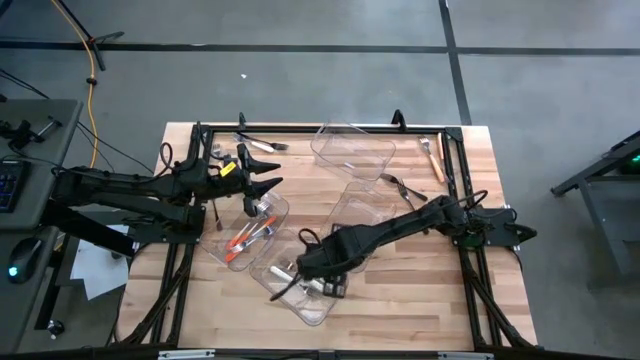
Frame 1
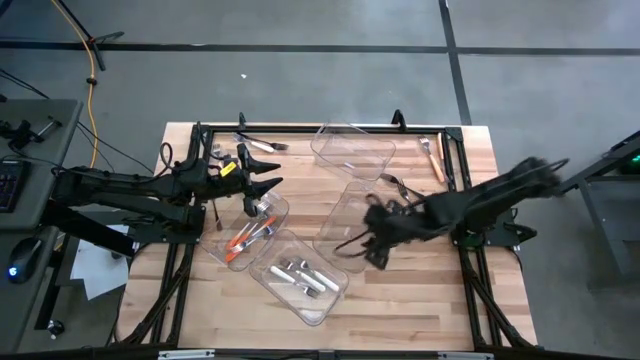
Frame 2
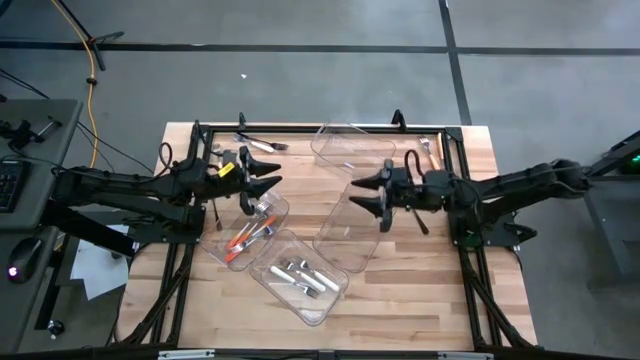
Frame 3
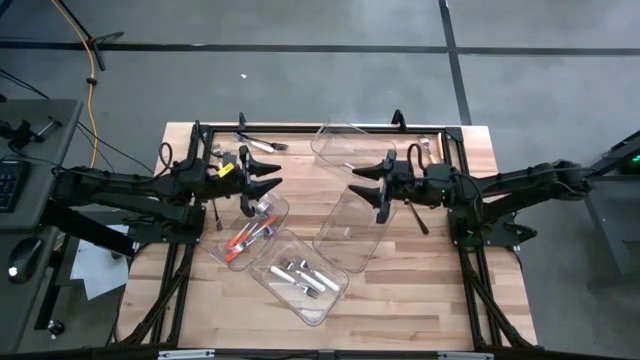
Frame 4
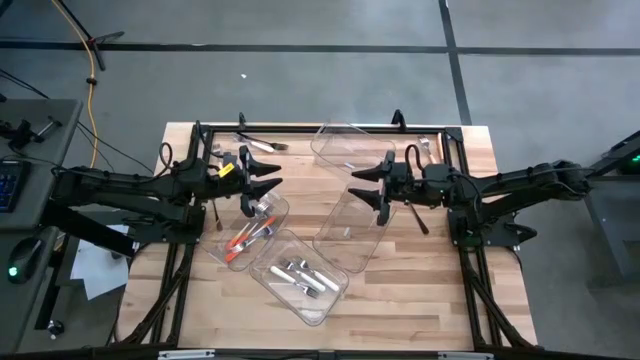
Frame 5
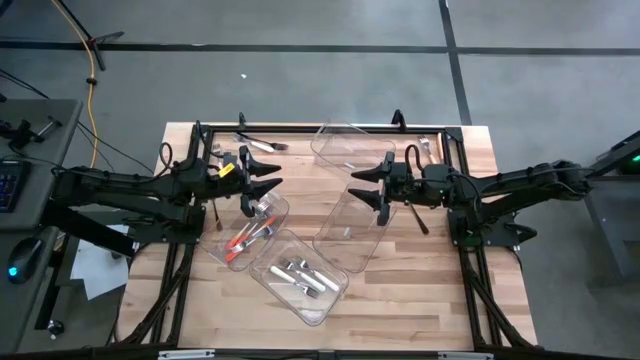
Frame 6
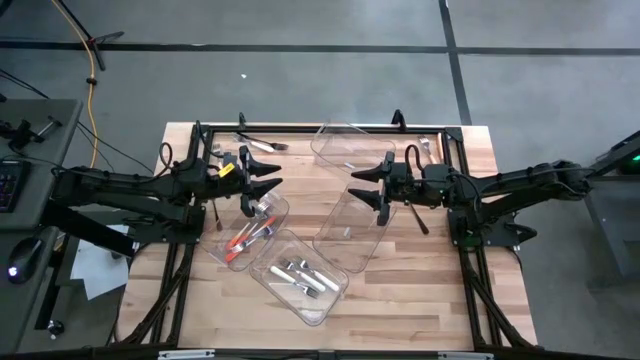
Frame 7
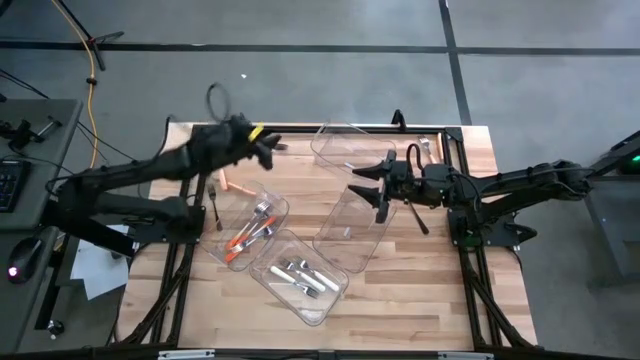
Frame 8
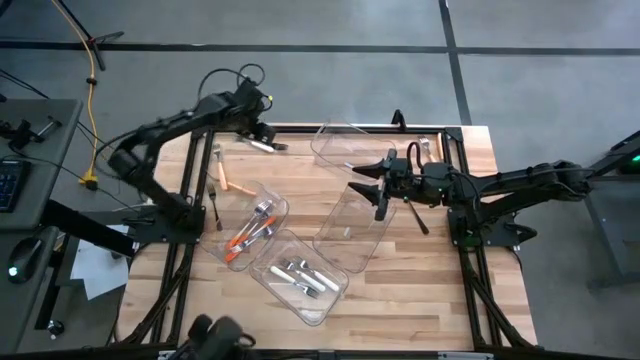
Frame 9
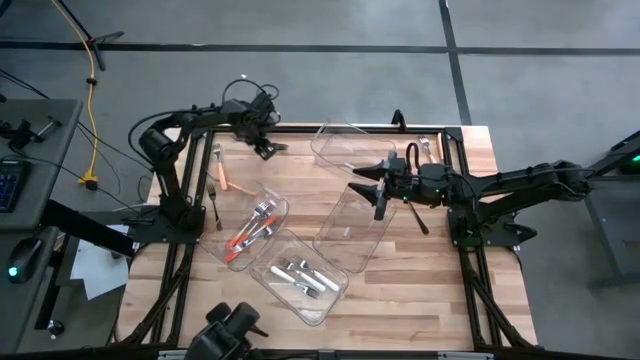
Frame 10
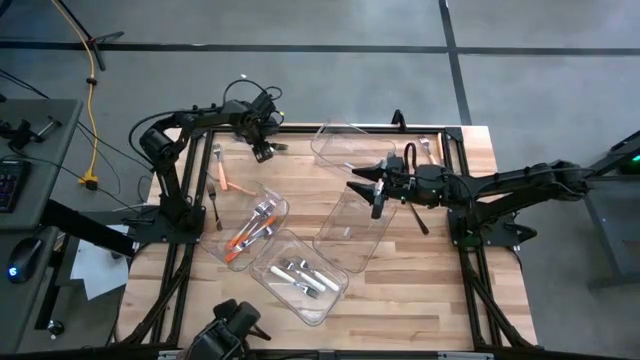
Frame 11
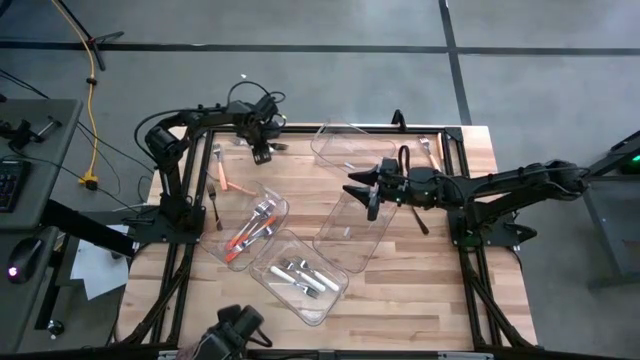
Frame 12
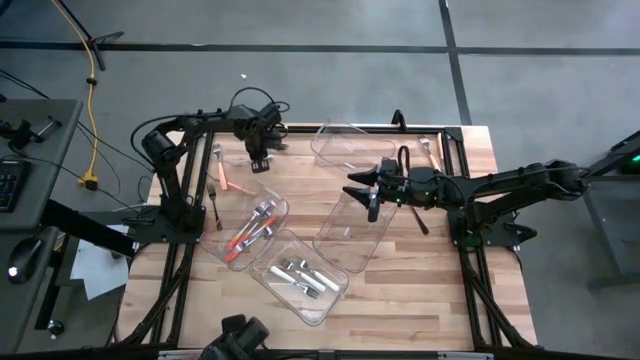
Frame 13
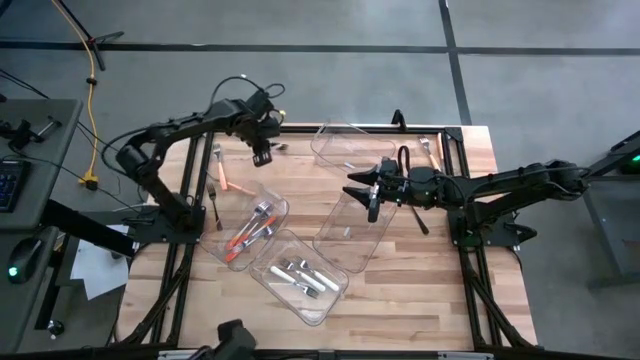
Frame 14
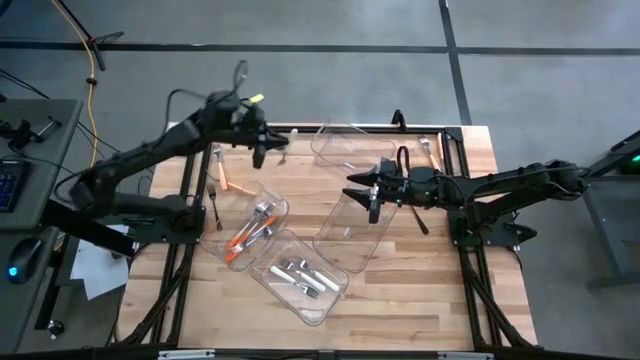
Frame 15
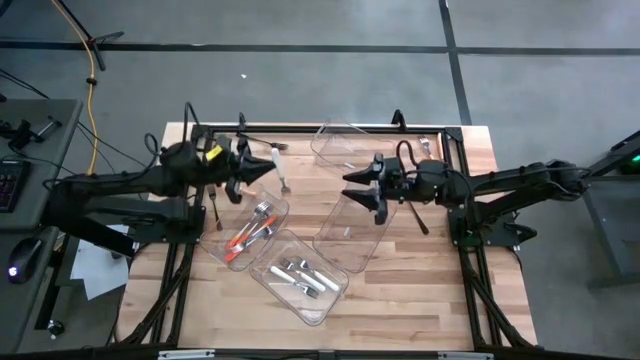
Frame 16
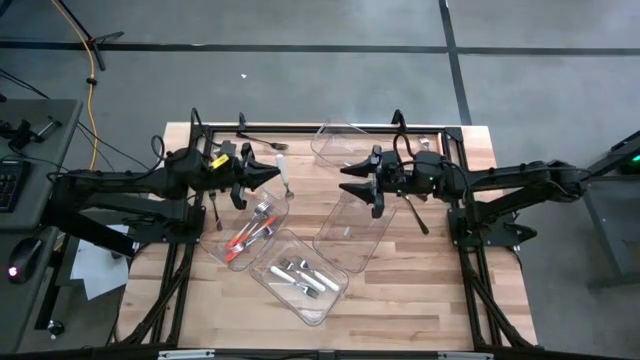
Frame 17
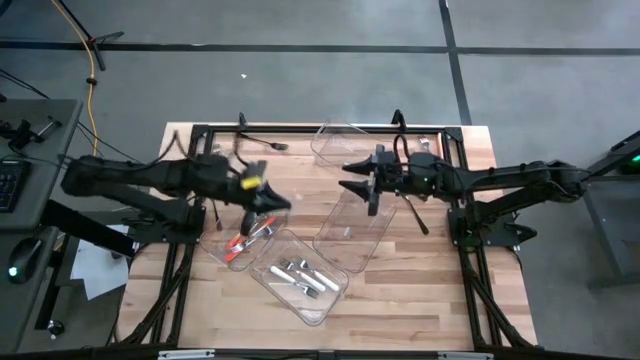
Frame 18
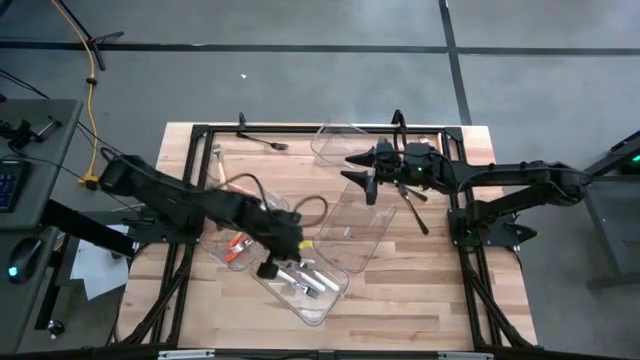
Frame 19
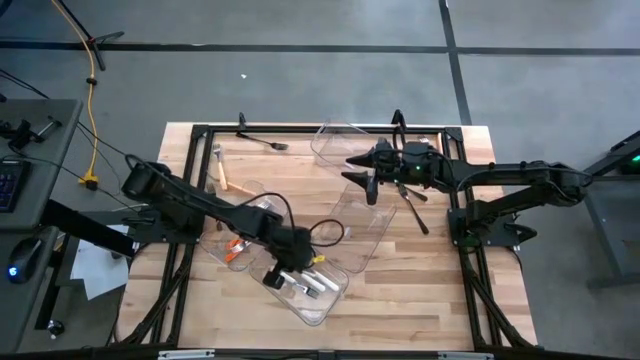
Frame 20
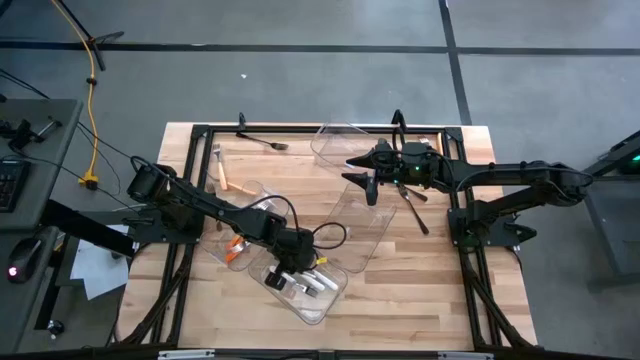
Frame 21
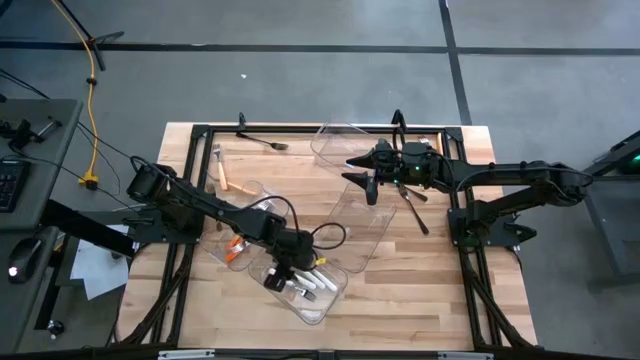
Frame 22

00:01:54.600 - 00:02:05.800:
Task: Sort silverware by color (type)
Put the white fork into the bottom transparent bin

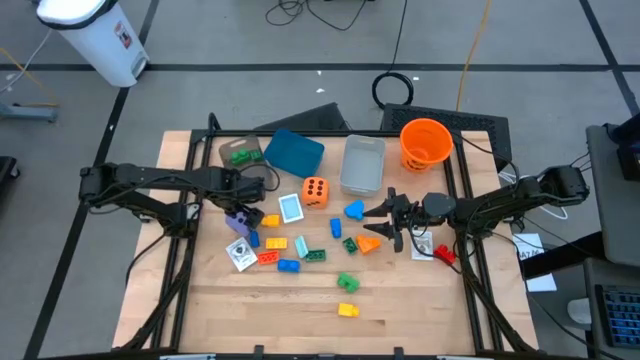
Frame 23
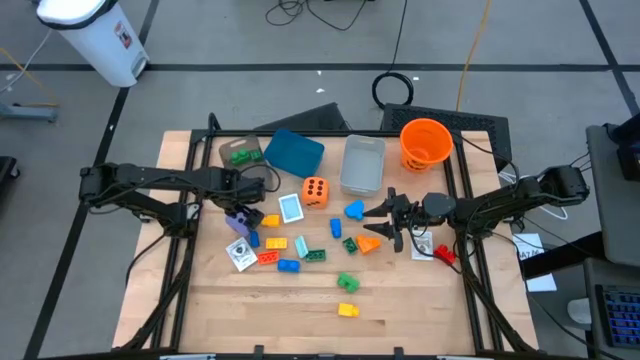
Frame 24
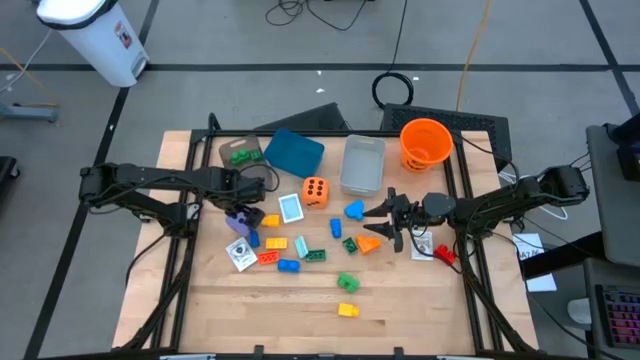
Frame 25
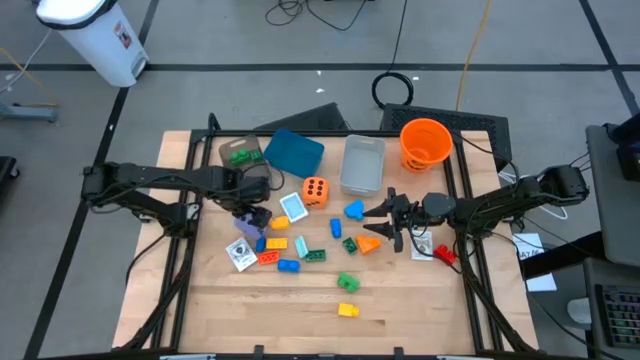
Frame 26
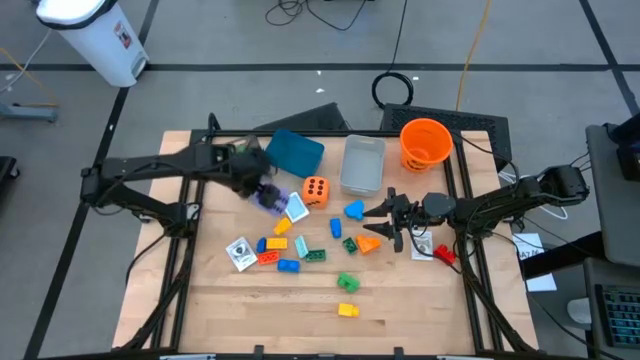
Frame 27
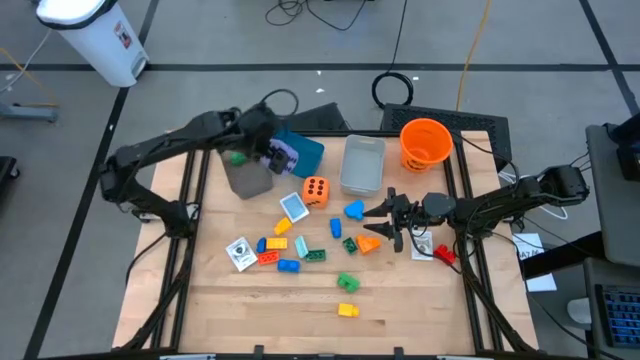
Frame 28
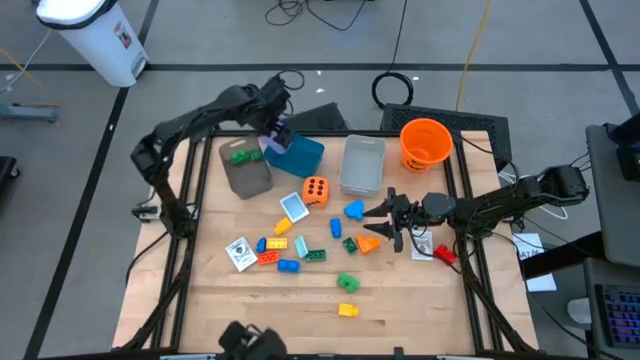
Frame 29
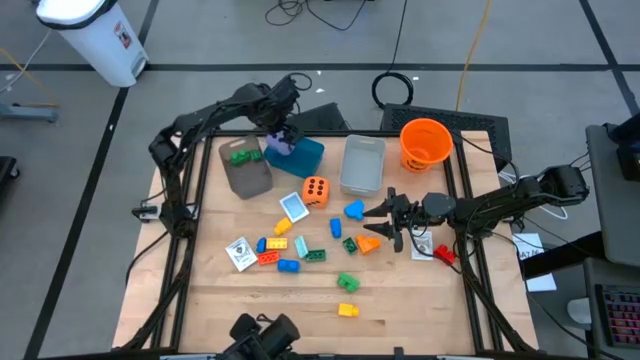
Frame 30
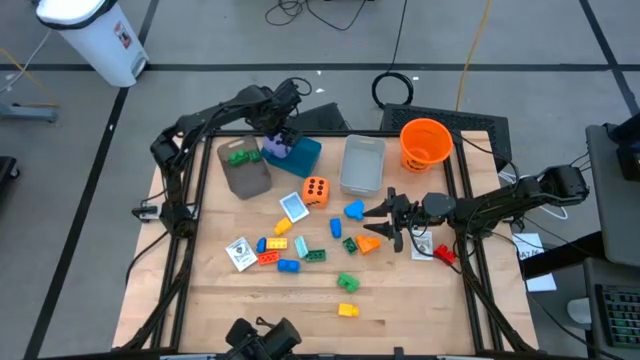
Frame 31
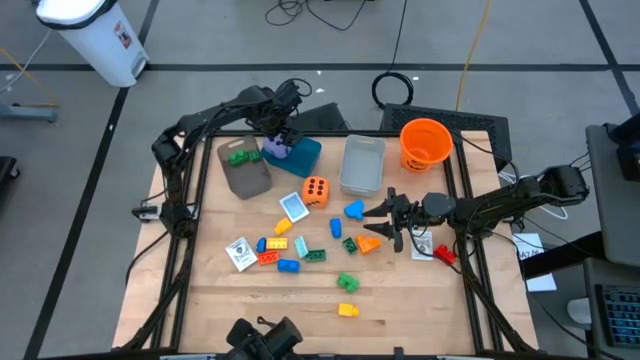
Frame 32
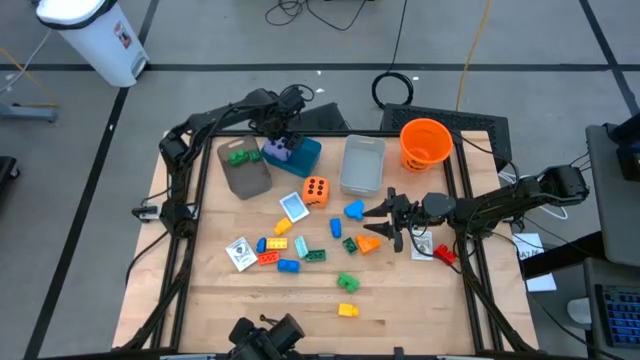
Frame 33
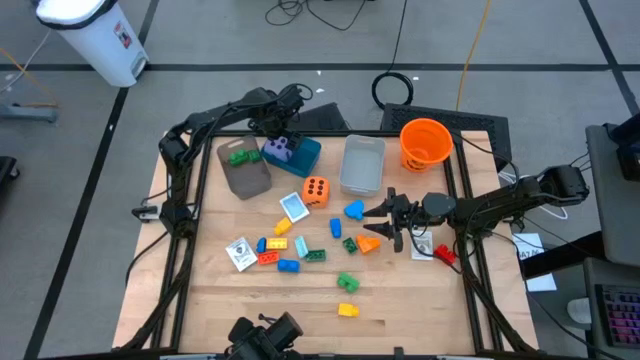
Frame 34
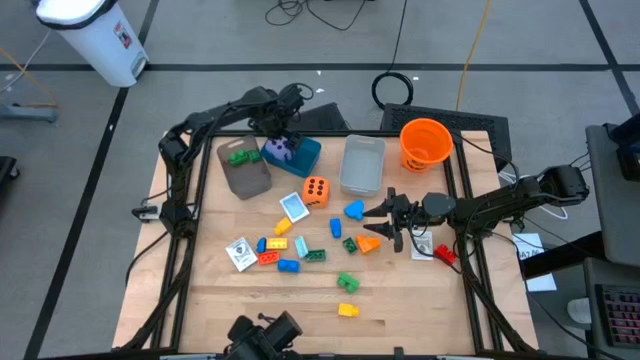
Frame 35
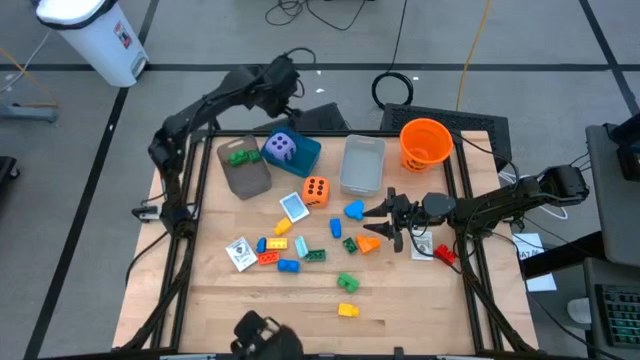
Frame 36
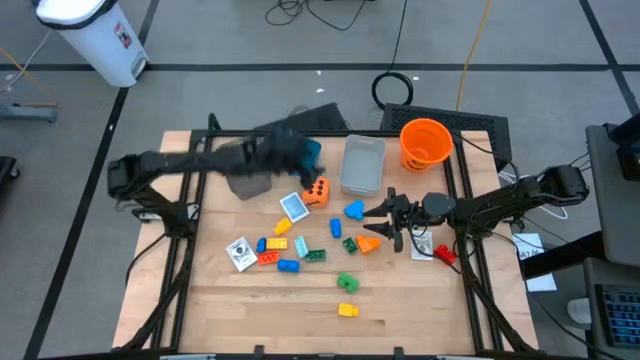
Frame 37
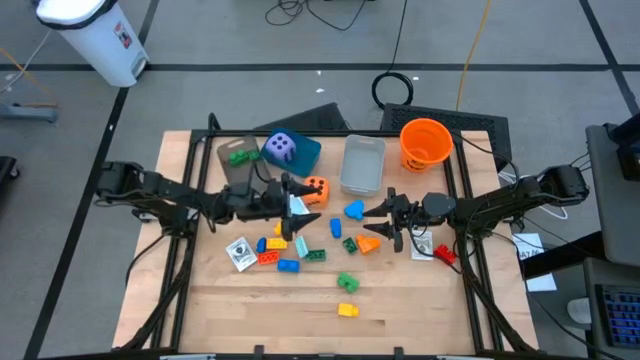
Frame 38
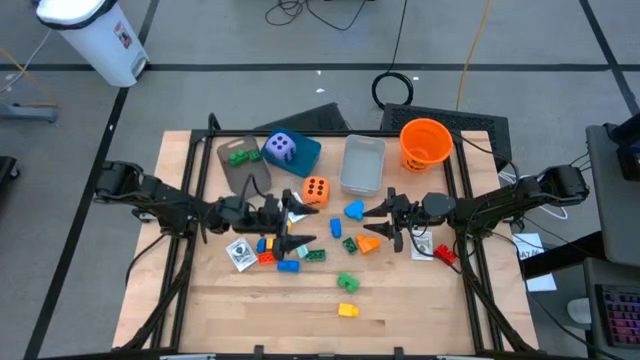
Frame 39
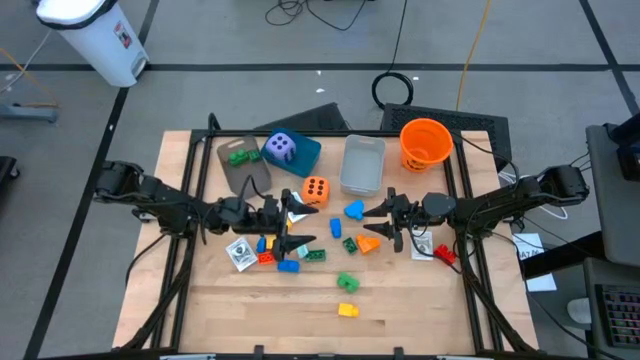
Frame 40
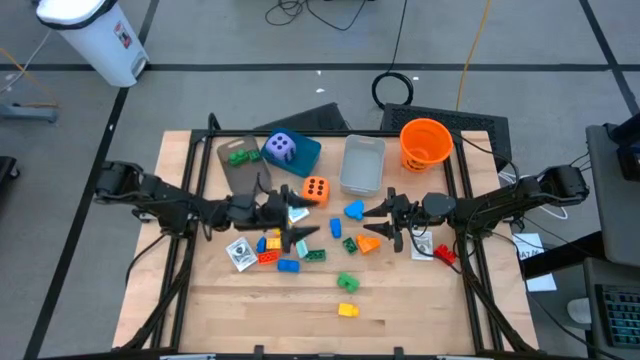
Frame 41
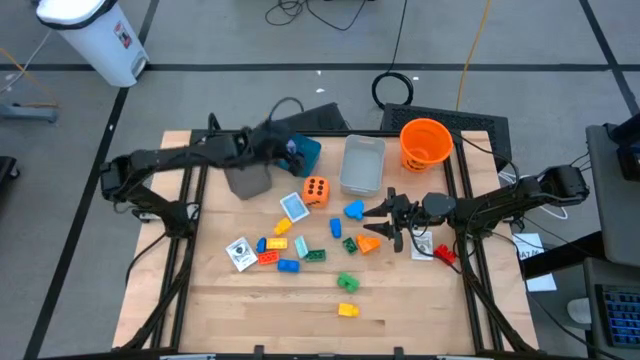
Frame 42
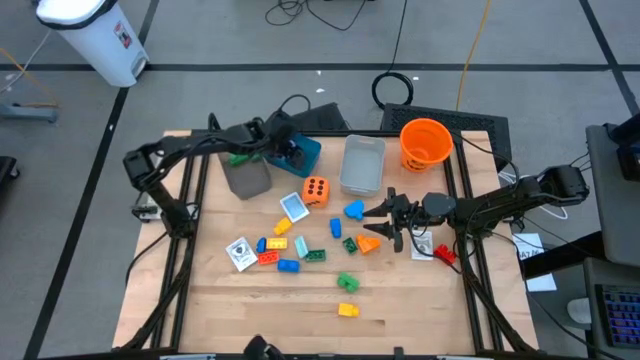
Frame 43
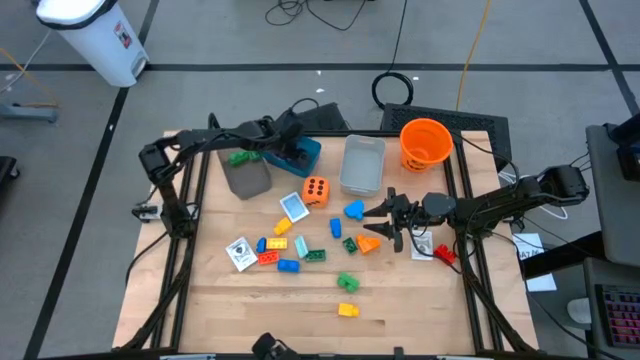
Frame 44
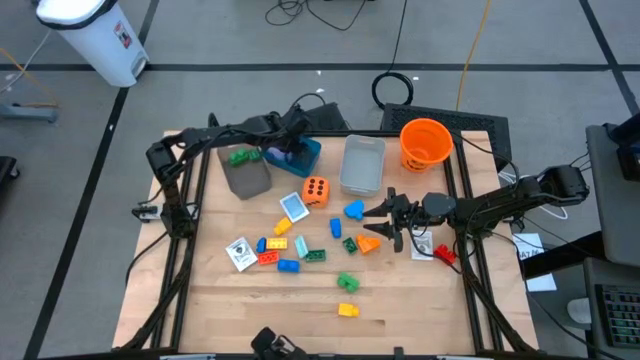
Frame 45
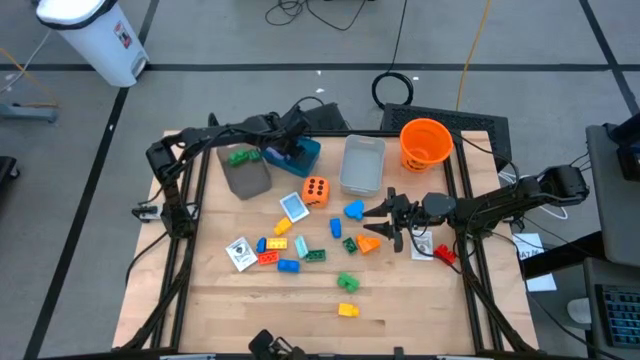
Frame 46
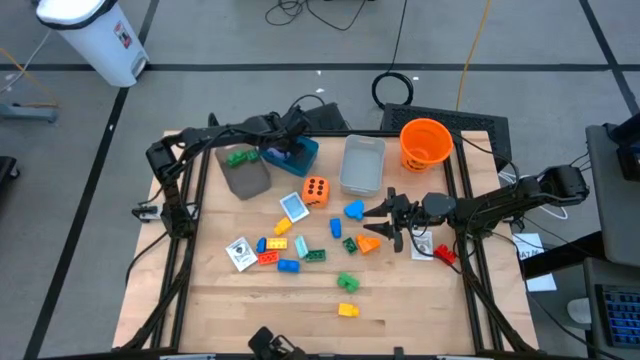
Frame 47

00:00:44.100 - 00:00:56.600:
Task: Pick & Place Toys
Put the purple dice into the blue bin
